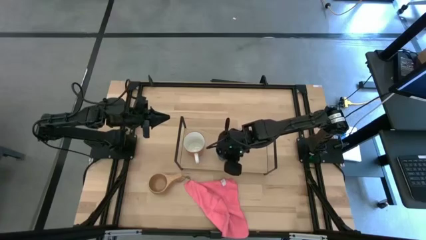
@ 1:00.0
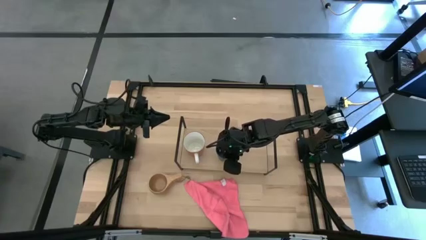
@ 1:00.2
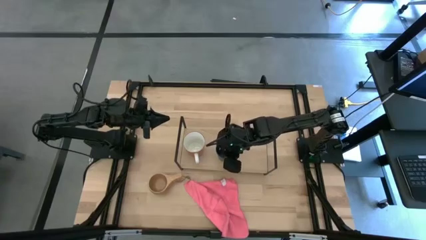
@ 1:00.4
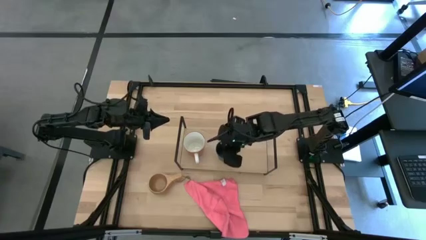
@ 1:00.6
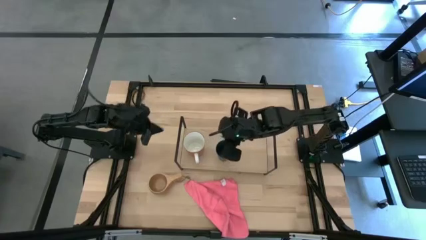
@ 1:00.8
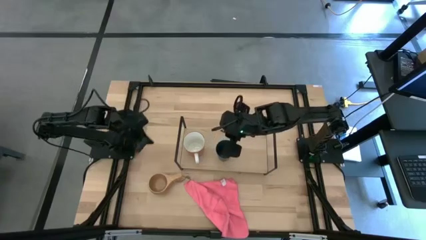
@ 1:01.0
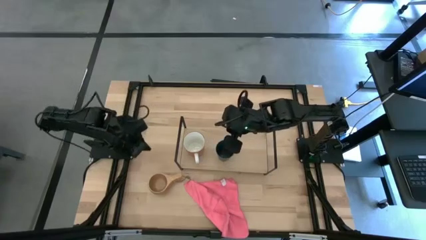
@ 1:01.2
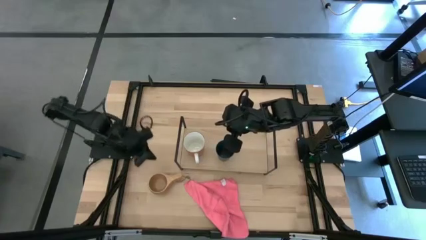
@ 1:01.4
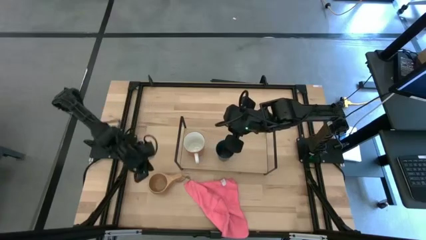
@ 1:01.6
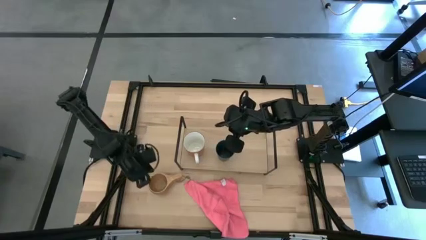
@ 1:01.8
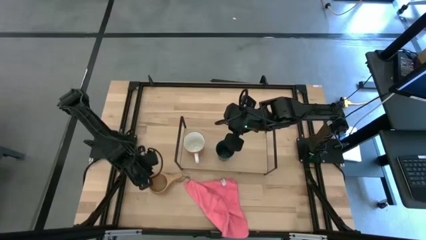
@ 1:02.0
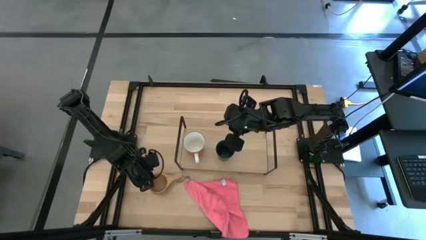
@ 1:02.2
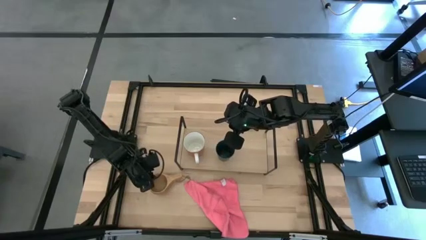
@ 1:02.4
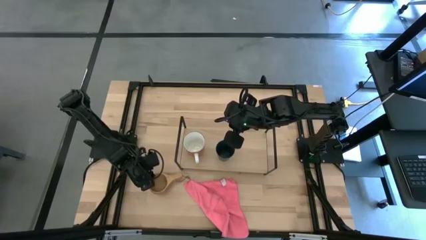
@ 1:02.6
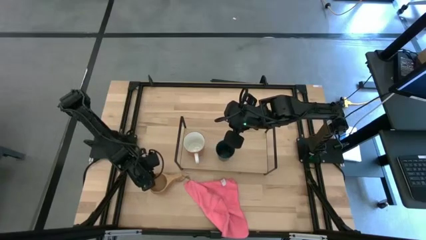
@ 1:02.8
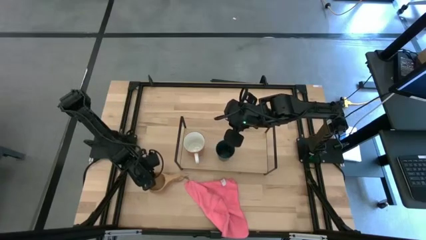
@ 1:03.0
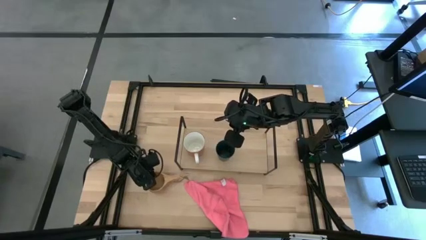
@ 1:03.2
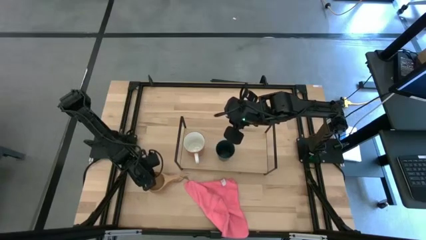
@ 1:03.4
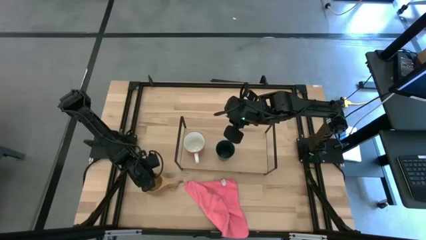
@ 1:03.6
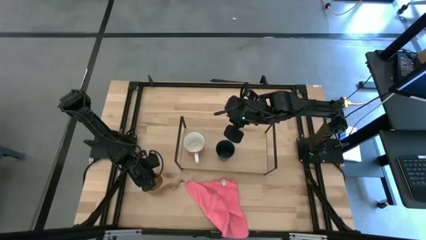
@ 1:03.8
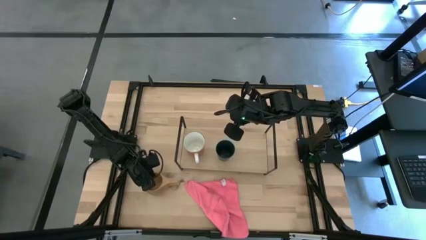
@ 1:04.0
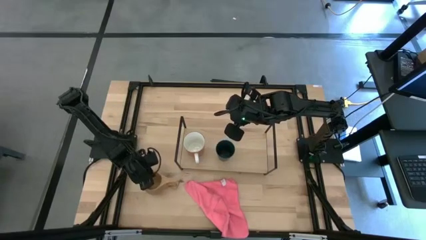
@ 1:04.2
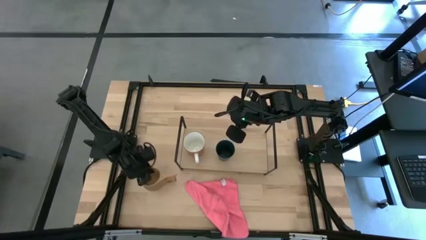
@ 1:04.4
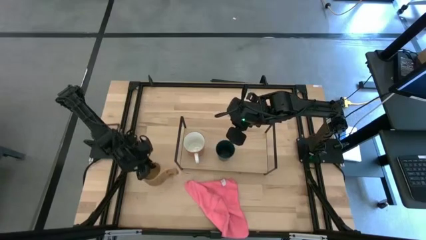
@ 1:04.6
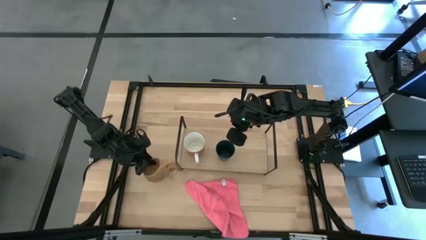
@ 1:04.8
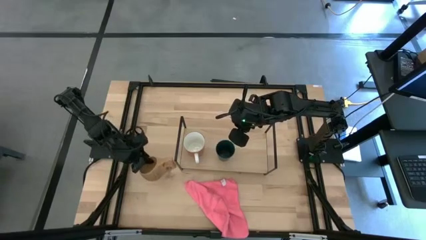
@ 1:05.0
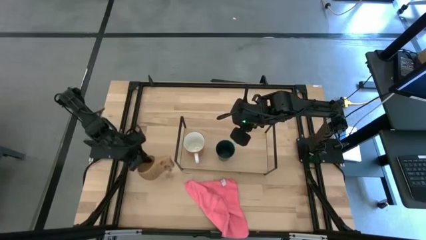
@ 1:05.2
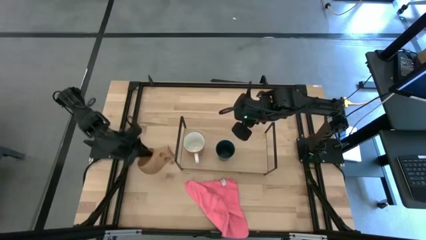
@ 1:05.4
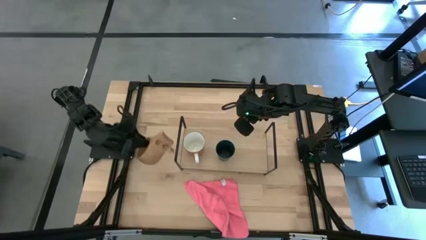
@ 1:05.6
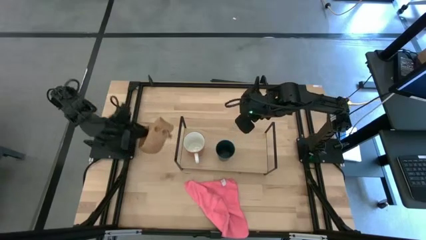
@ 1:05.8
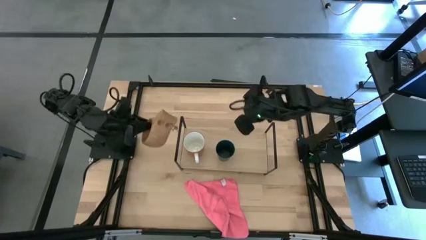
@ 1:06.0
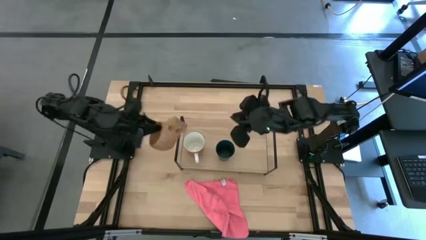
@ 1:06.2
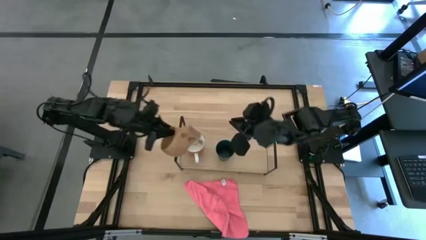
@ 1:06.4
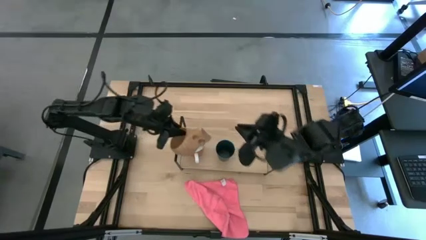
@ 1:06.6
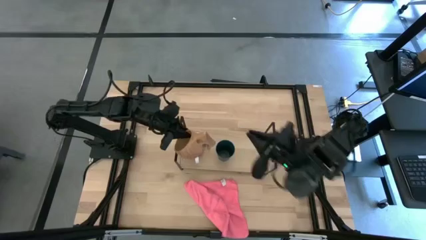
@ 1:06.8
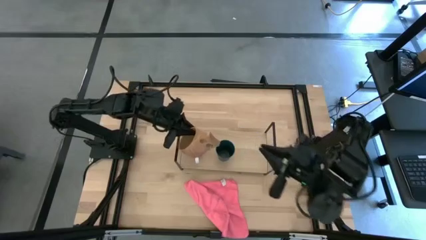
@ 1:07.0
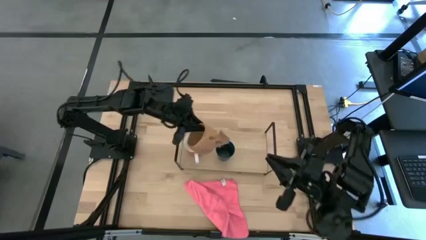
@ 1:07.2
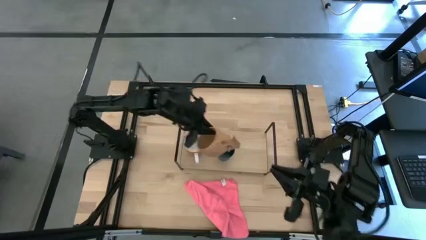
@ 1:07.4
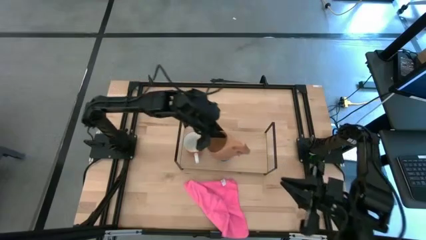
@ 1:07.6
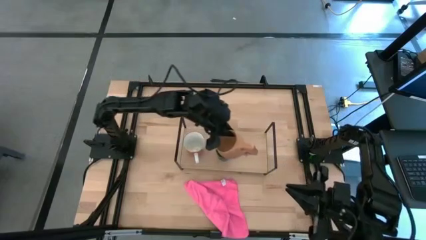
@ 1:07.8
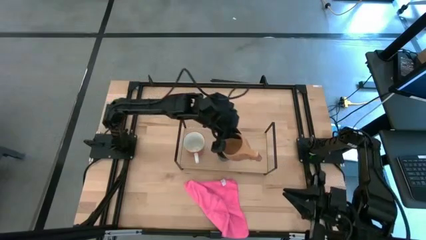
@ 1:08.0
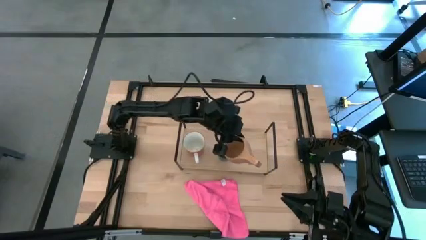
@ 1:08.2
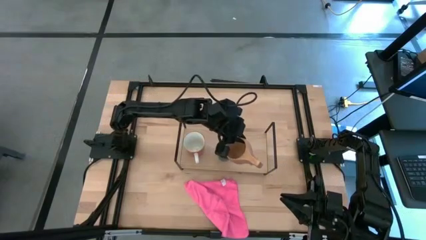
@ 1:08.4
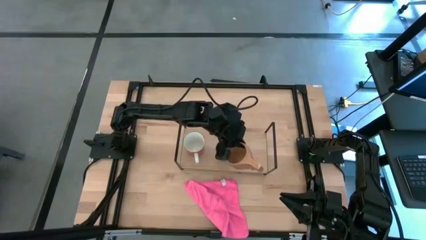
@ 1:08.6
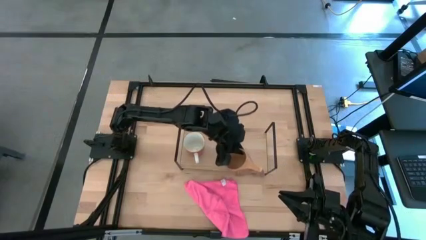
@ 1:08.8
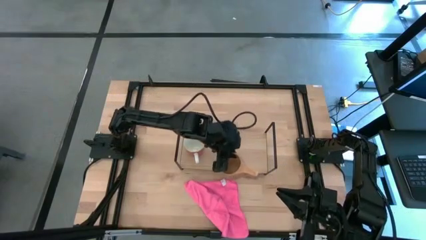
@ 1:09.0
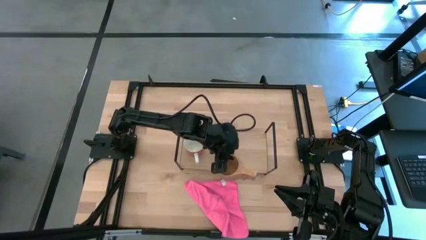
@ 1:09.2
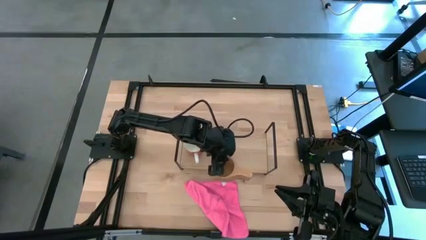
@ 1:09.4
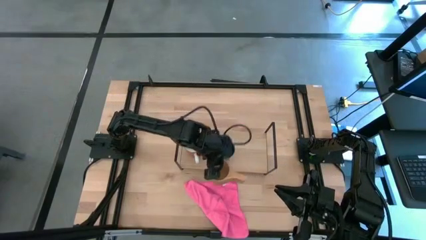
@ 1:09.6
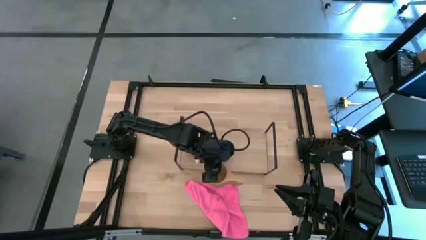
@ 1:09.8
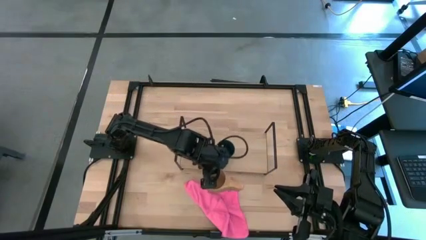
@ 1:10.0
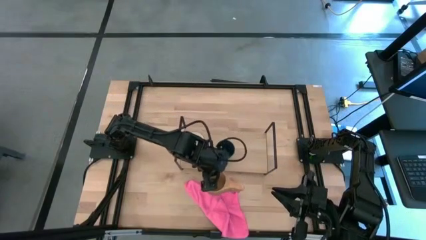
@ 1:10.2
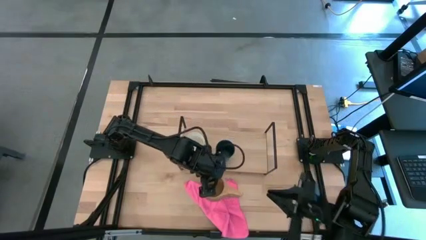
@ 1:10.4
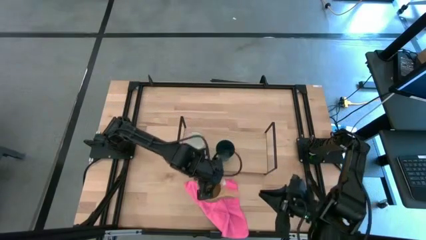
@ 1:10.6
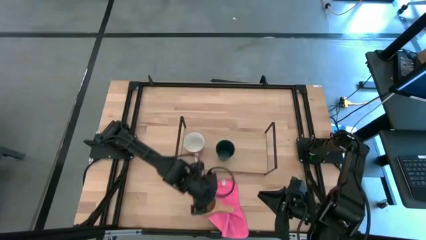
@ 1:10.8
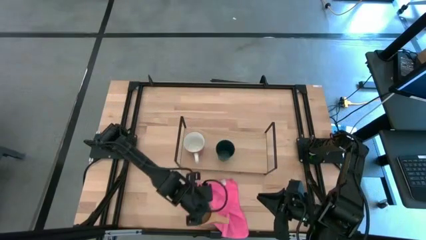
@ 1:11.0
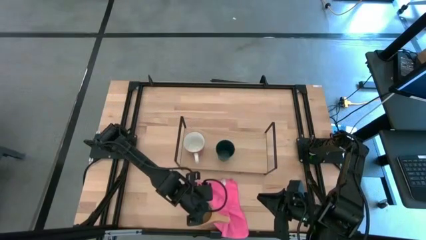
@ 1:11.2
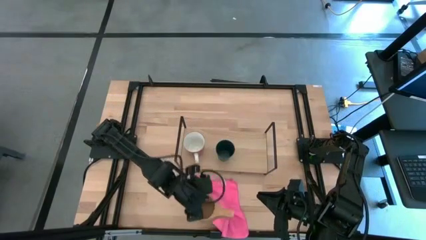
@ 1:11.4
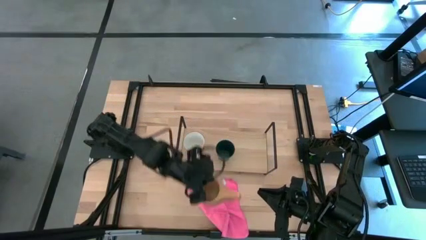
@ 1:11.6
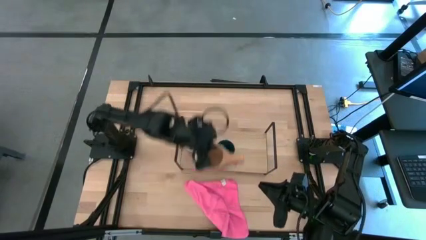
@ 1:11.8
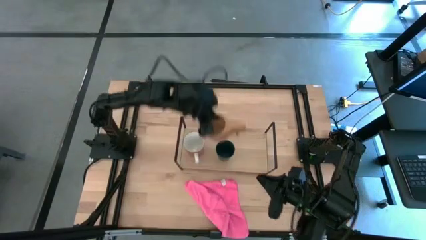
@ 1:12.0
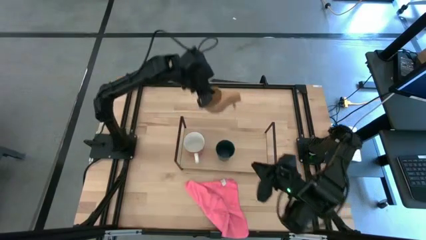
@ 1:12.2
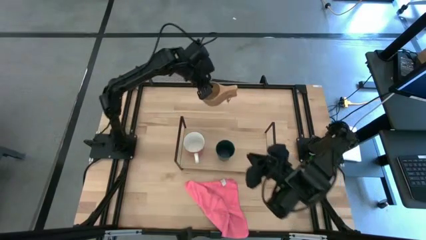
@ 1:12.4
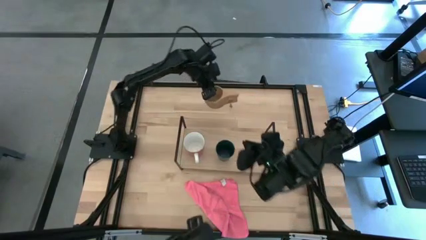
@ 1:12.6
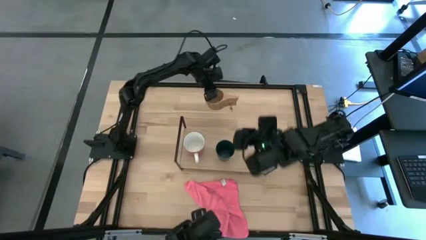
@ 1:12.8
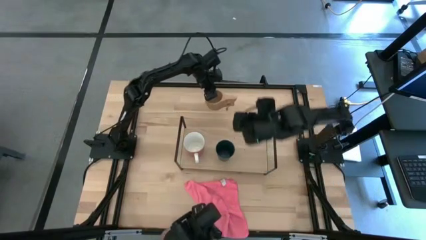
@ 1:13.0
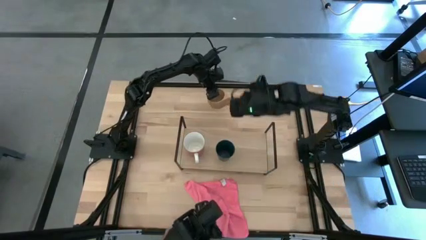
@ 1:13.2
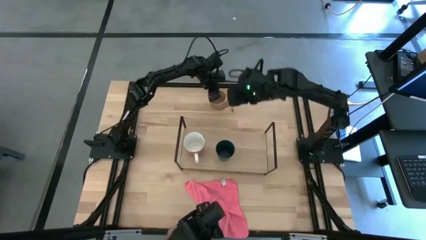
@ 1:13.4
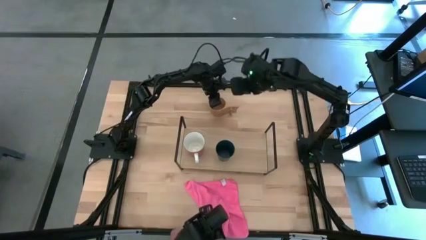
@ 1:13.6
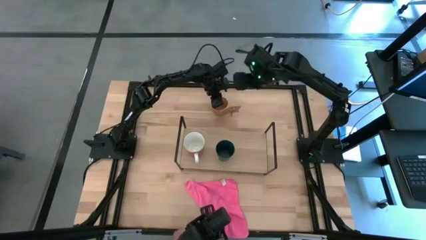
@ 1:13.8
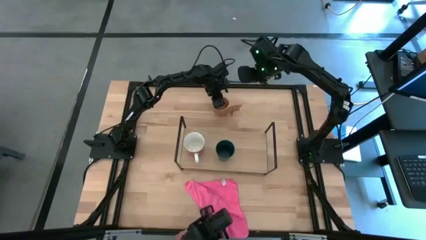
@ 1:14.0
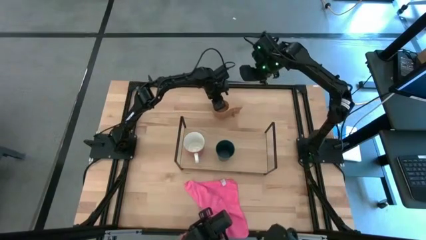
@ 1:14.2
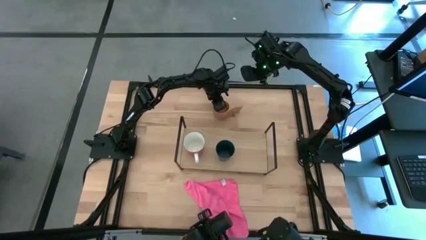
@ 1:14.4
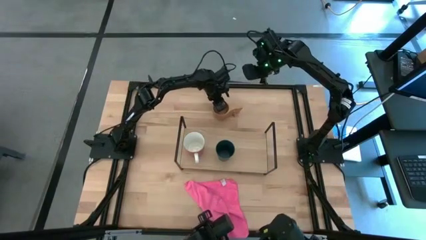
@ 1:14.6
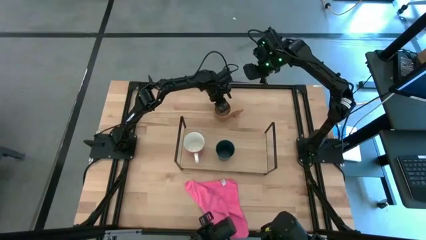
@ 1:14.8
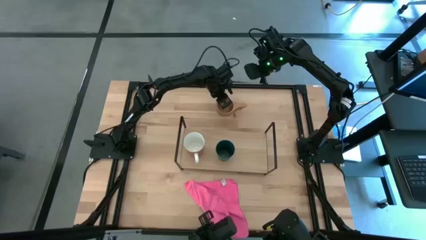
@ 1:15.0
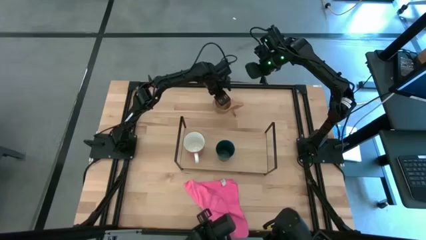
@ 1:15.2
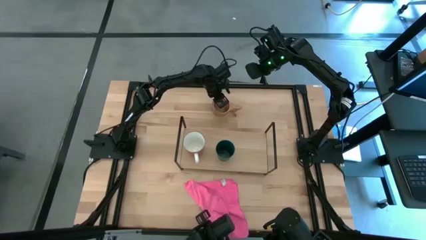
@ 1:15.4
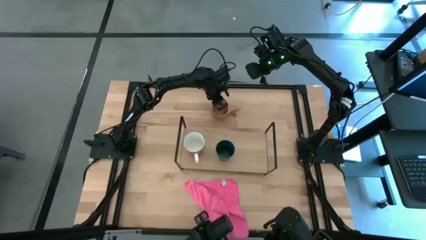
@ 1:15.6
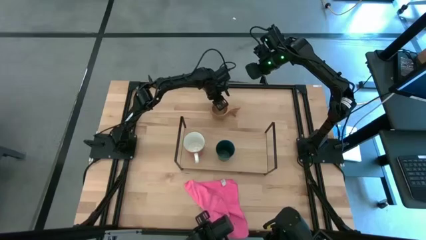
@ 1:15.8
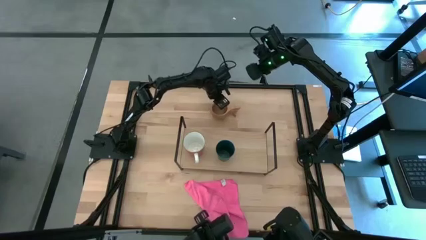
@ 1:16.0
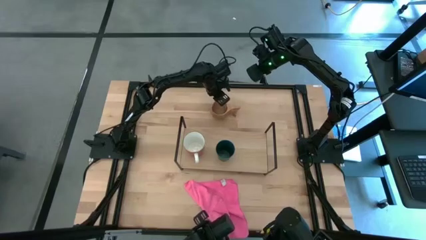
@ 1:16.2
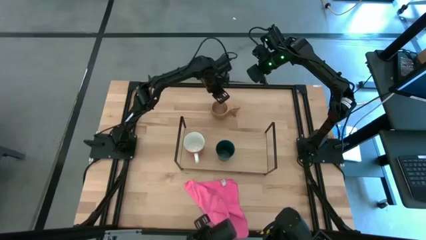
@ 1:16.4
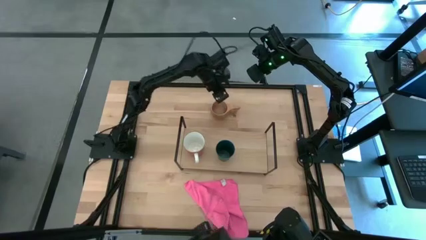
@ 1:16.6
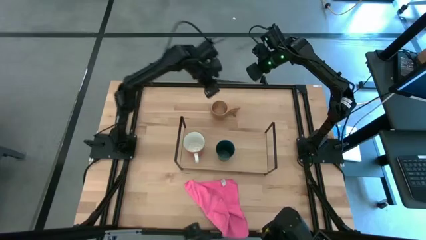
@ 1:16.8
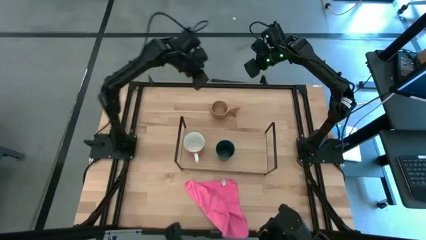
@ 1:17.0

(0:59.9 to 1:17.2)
Task: Stack small to large cups/mugs on shelf
Move wooden mug from the bottom to the top
